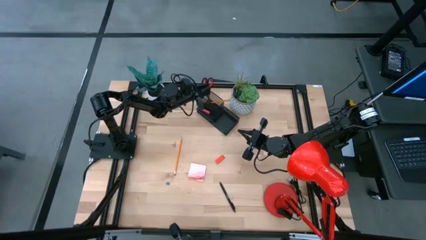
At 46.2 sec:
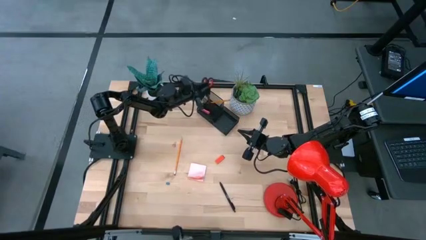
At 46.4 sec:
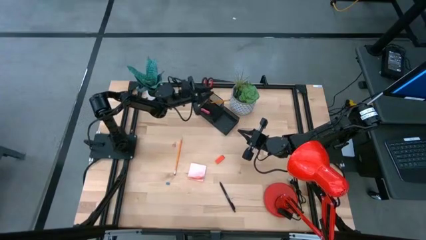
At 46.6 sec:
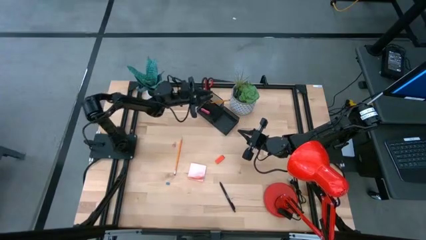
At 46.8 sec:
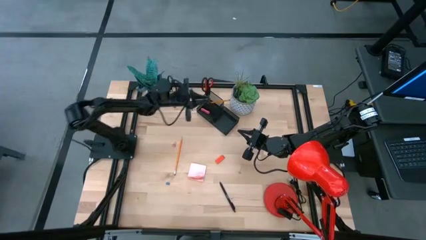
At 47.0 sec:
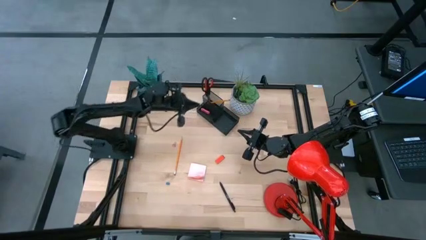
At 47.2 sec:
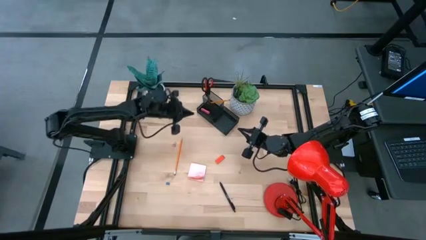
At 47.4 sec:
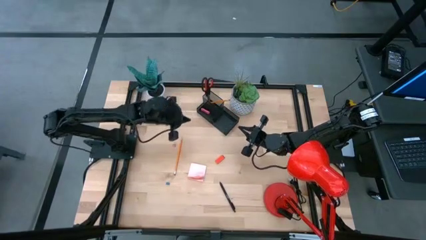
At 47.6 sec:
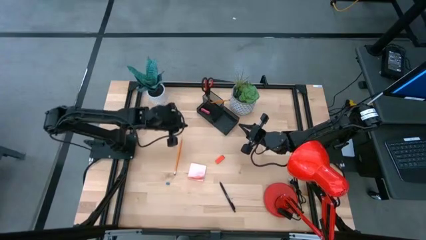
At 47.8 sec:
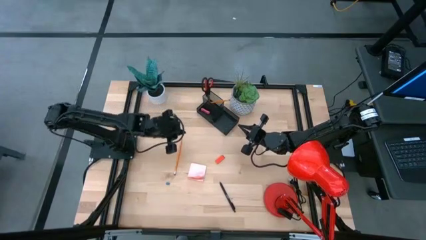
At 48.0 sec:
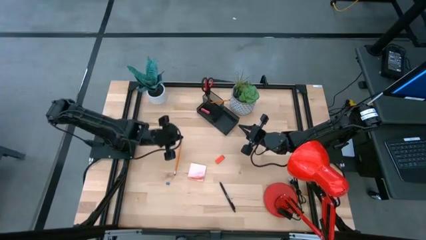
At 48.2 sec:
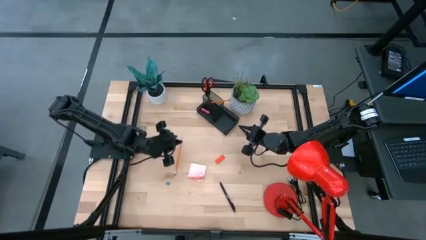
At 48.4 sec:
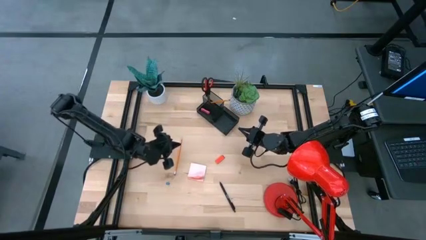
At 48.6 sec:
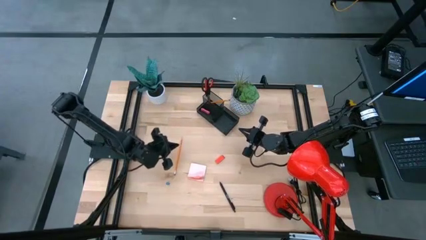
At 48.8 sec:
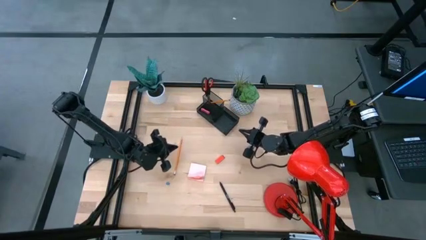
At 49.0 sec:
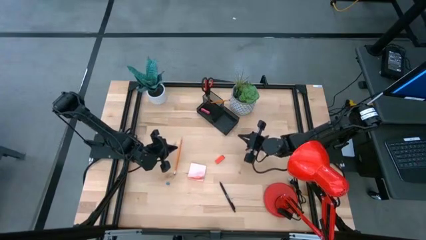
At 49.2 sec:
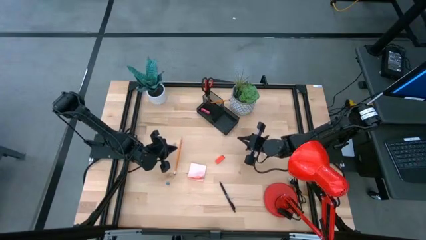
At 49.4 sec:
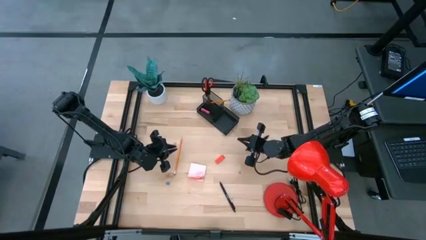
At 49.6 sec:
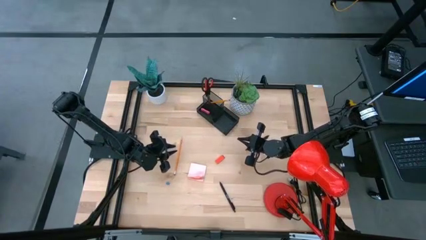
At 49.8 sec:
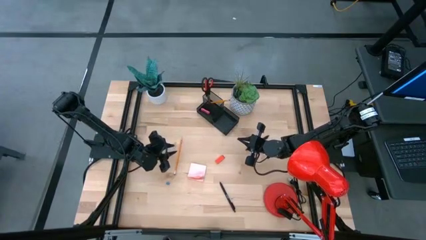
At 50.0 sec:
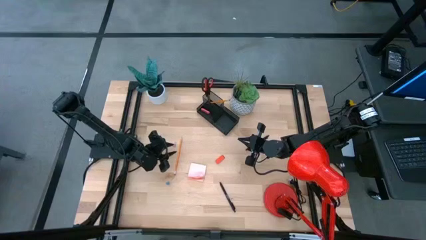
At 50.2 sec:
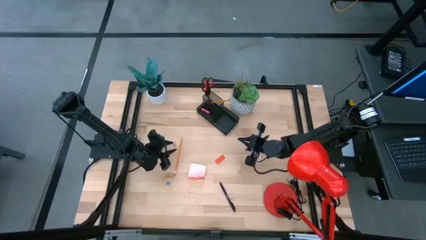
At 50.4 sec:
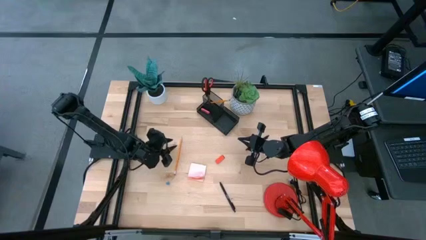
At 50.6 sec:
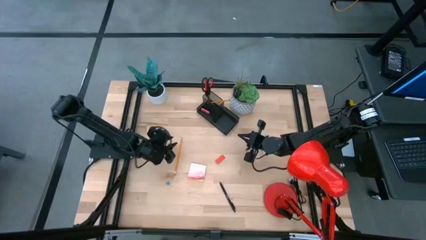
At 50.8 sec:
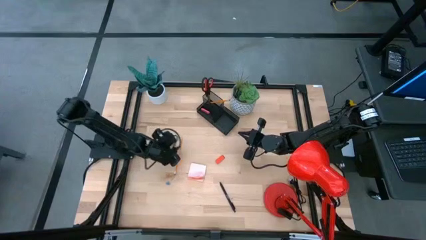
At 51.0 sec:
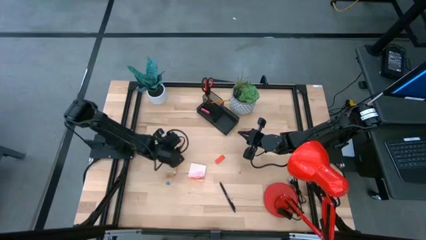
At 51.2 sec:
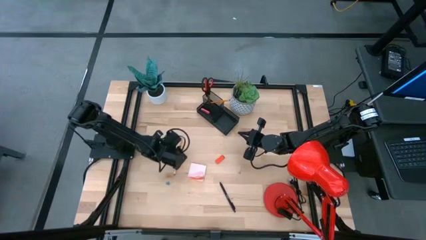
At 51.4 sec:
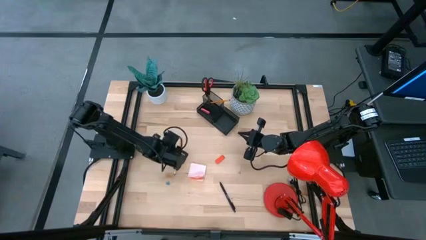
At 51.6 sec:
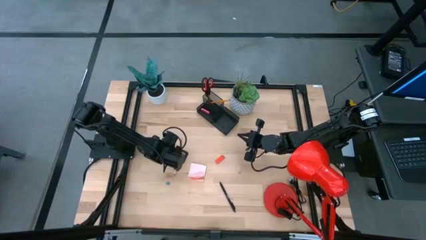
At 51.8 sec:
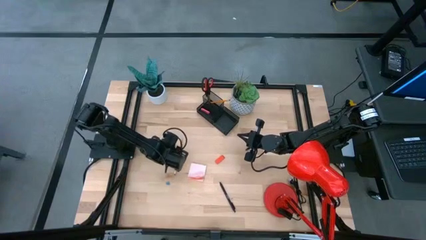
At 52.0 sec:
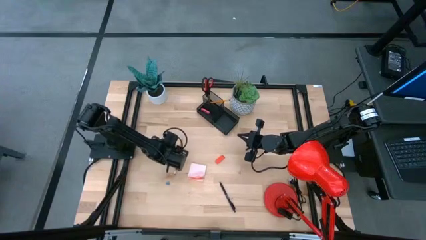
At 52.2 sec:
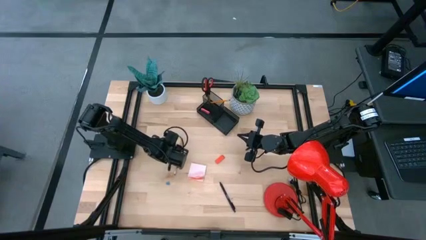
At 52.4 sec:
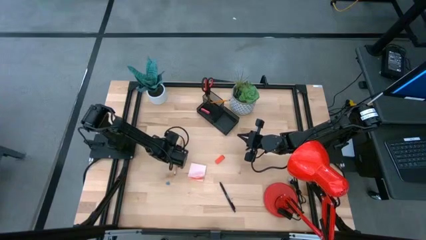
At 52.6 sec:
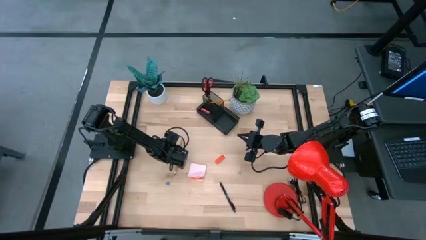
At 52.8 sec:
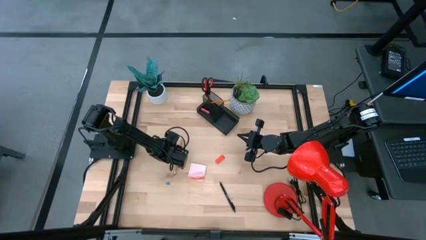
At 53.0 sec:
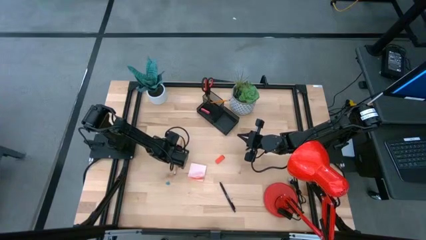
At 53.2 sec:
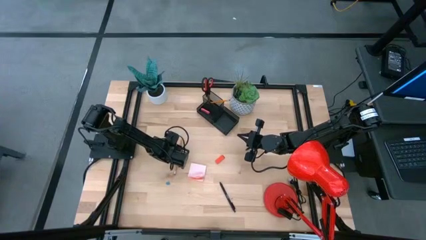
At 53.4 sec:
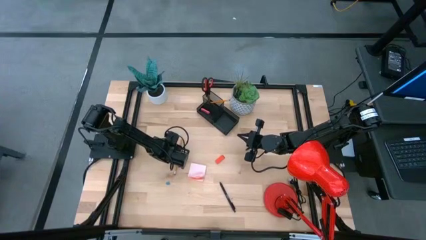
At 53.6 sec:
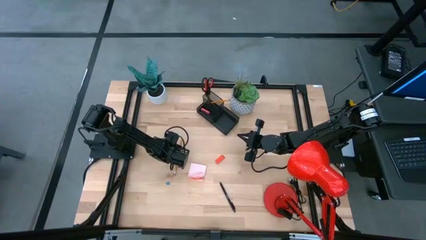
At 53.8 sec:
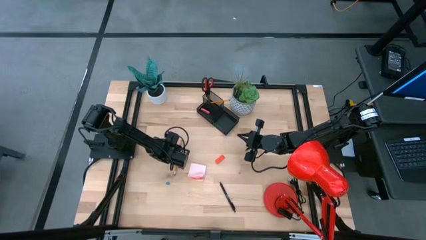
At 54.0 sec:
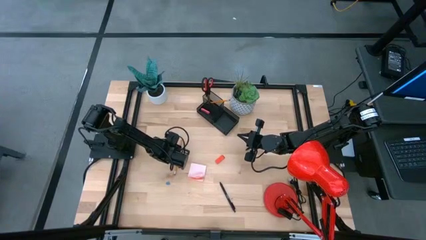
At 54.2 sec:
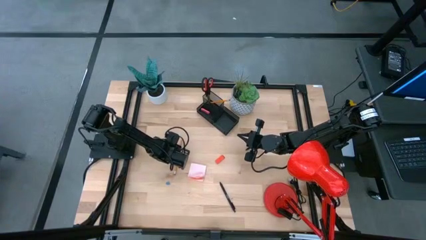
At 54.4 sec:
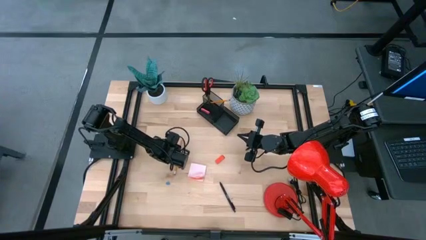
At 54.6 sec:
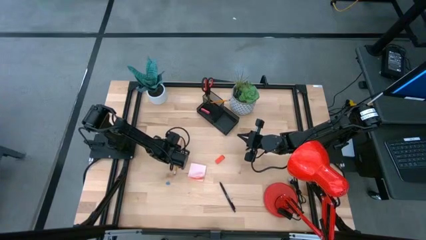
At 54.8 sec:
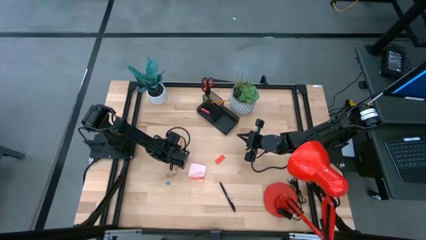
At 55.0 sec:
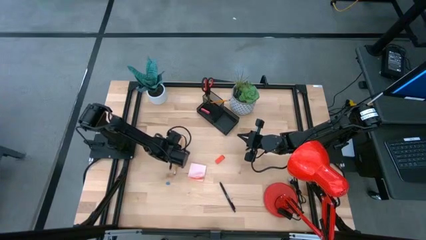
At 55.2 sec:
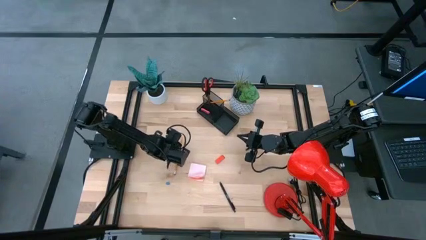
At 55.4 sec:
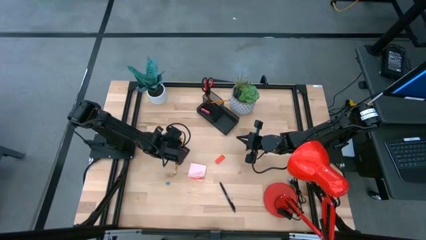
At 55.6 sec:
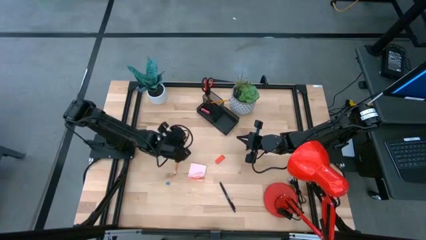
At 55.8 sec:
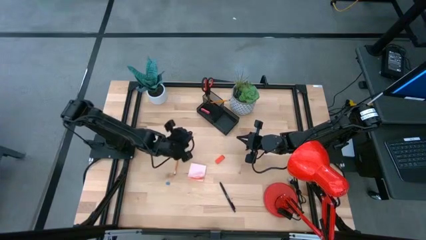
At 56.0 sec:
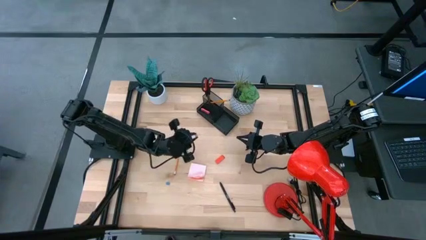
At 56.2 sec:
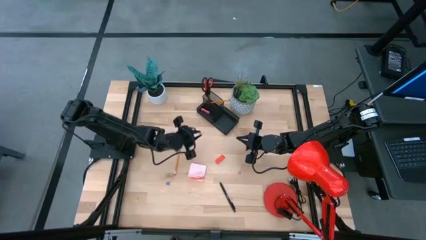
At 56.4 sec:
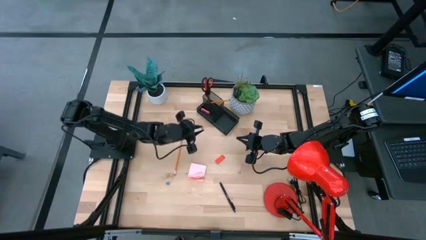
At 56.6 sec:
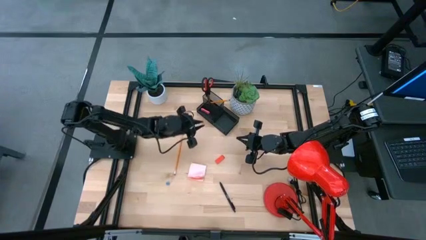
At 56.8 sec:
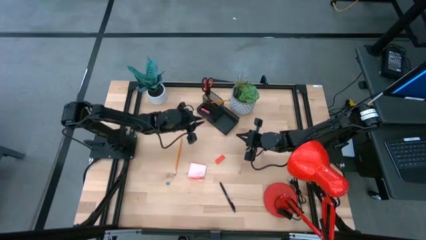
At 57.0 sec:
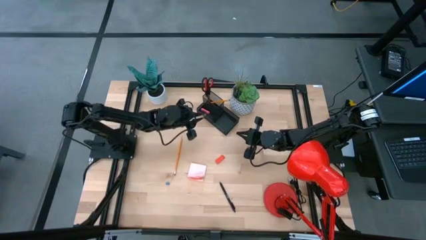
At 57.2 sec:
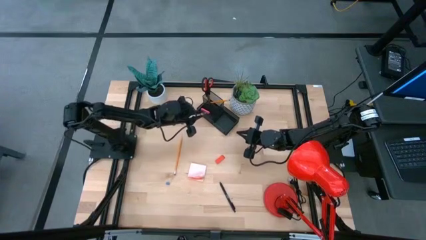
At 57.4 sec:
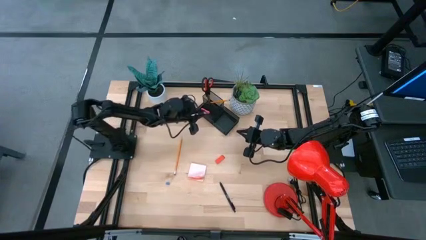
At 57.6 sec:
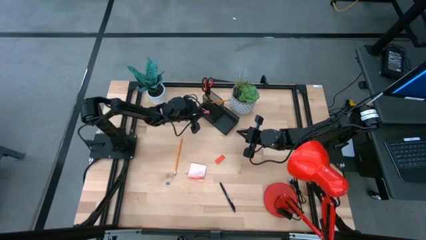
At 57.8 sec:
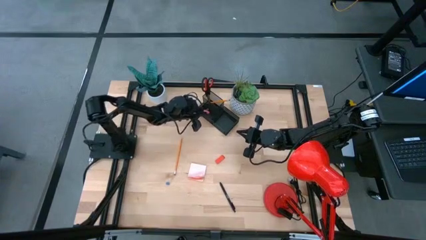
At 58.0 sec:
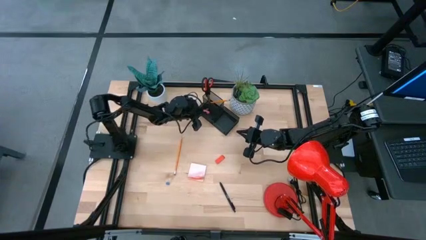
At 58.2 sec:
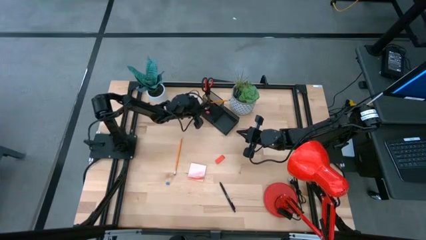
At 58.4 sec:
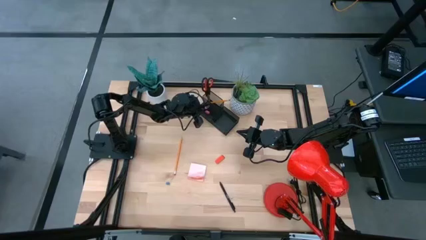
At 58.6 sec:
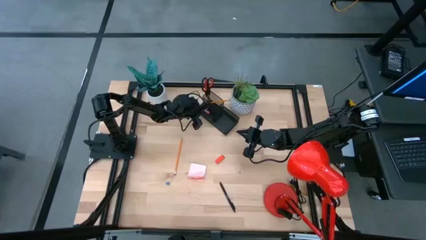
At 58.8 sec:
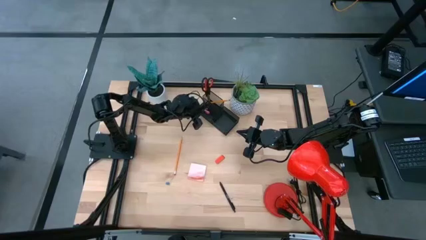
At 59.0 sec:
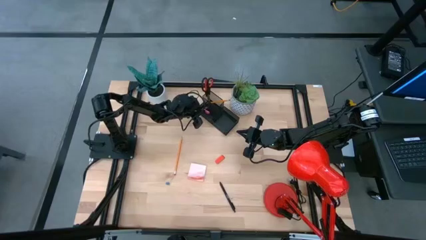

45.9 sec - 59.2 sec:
Task: Pick and place office supplies into organizer
Put the pink binder clip into the black desk organizer
